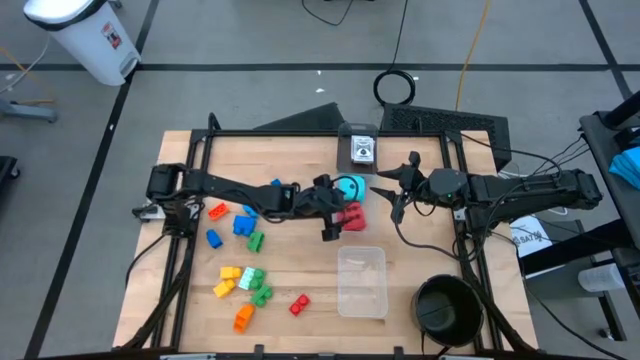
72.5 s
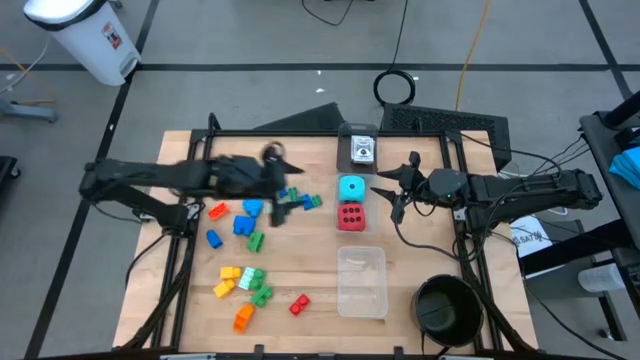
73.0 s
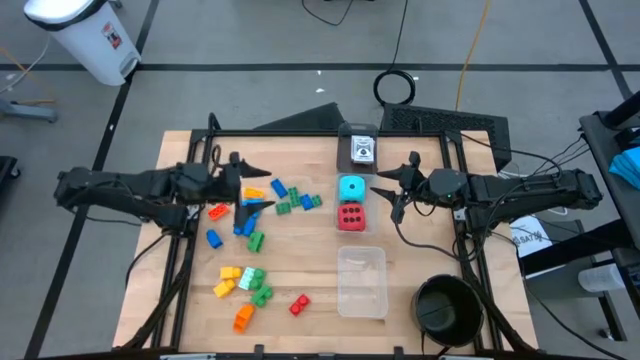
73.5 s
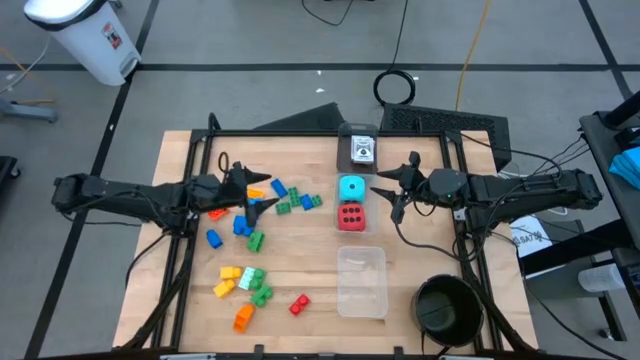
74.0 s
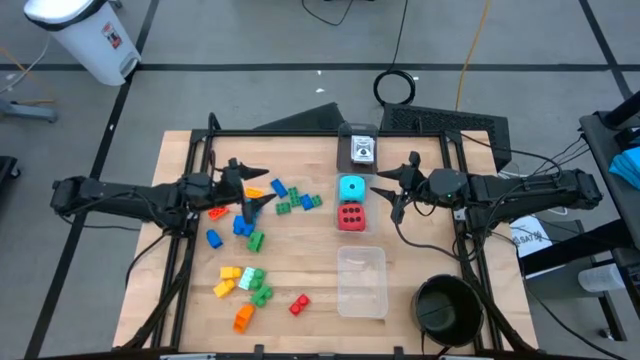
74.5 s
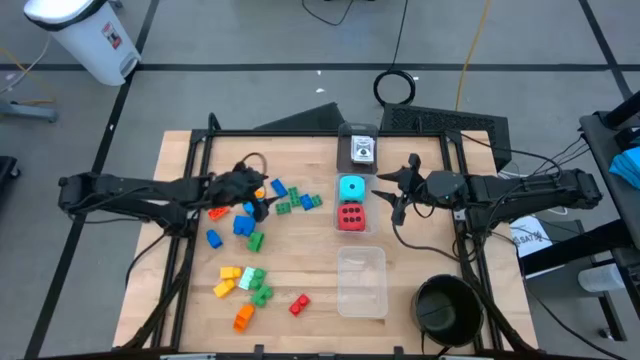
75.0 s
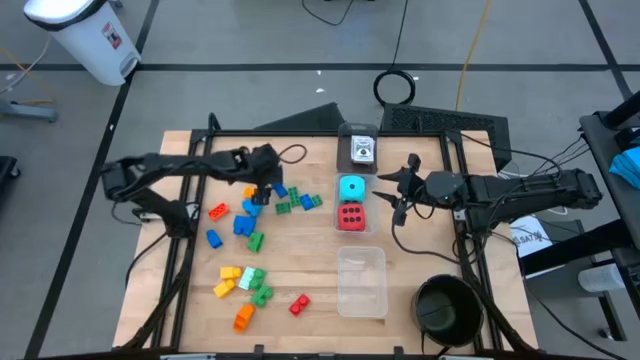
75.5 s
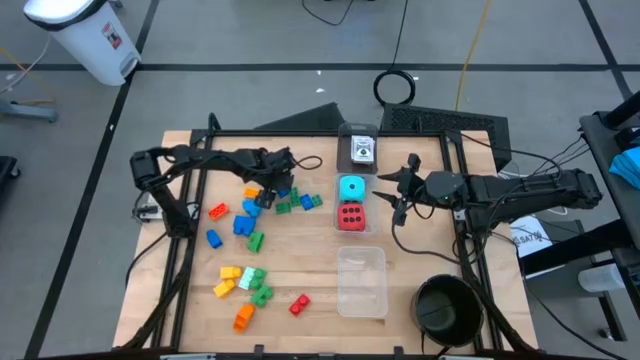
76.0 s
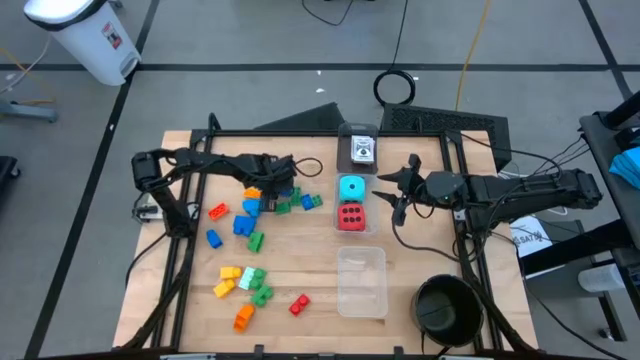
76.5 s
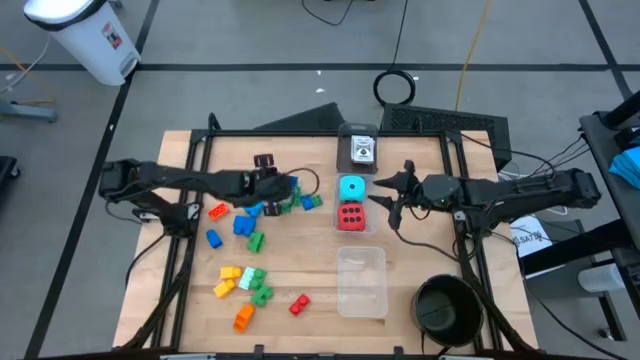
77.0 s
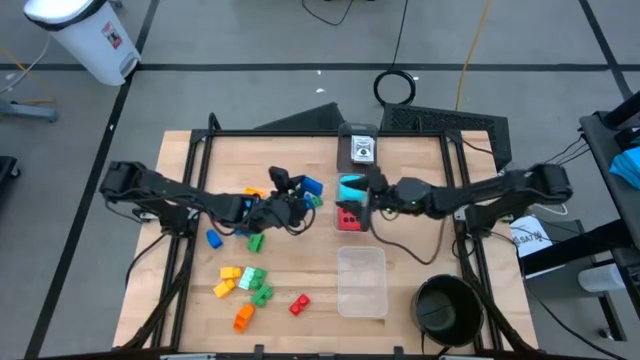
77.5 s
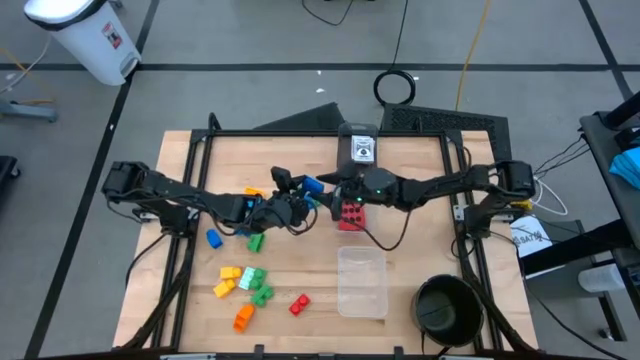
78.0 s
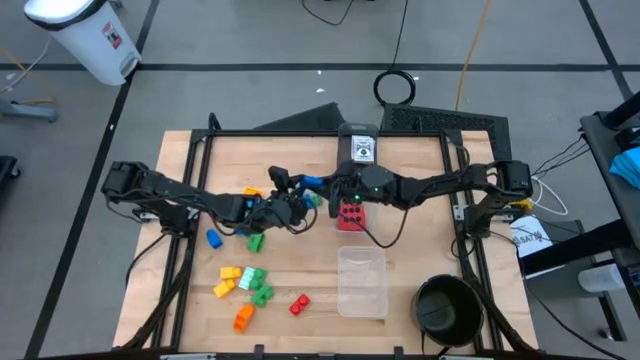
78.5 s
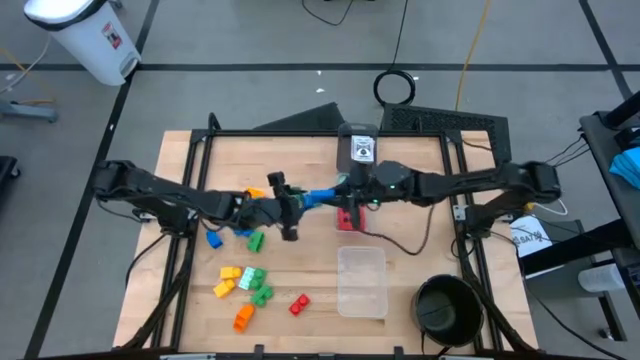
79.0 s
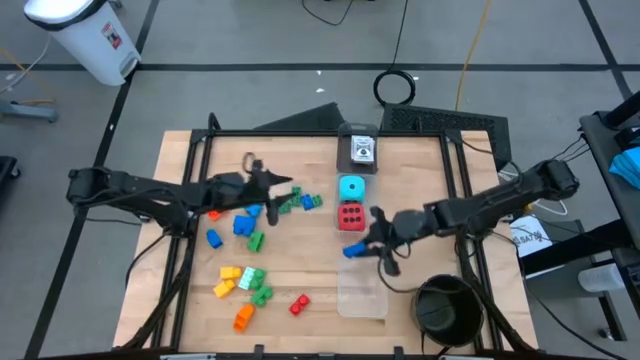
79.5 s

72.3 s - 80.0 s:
Task: Pick & Place Toys
Put the blue 8 stud game piece into the bottom transparent bin

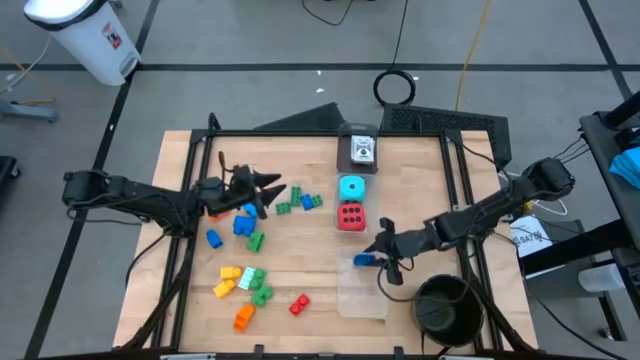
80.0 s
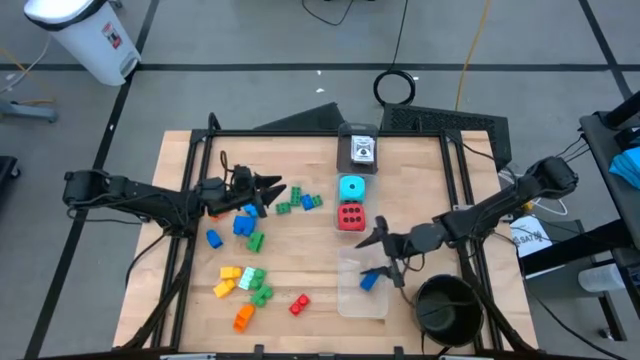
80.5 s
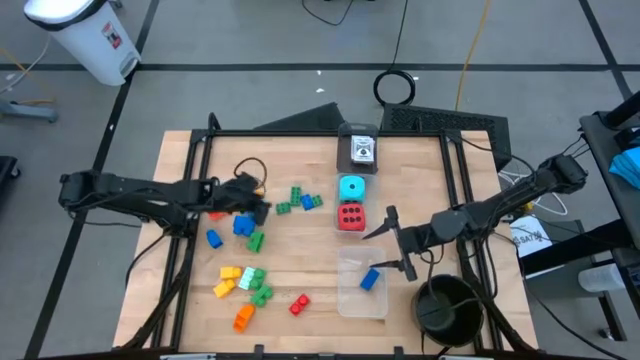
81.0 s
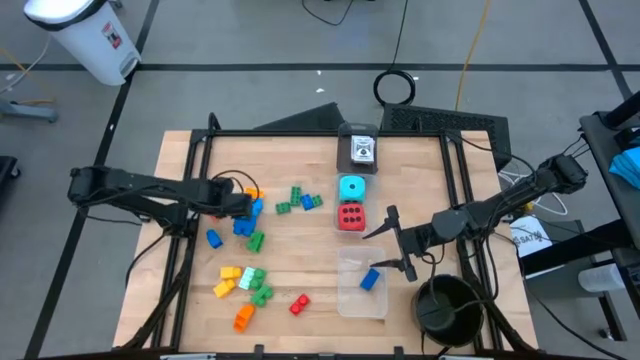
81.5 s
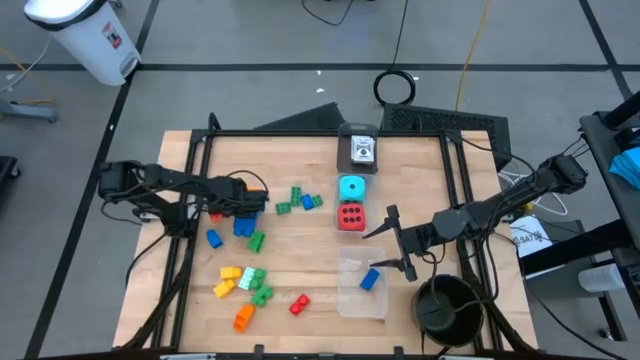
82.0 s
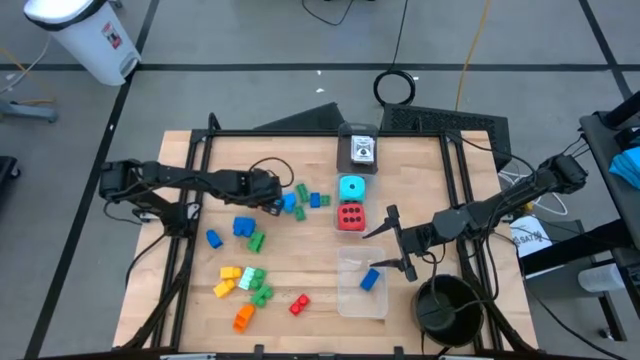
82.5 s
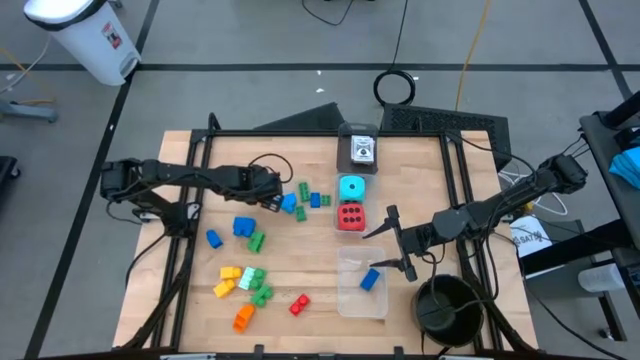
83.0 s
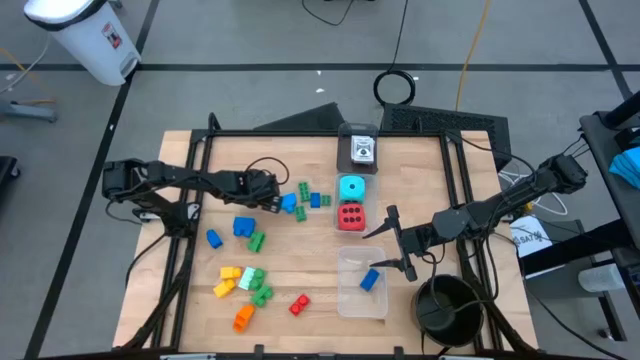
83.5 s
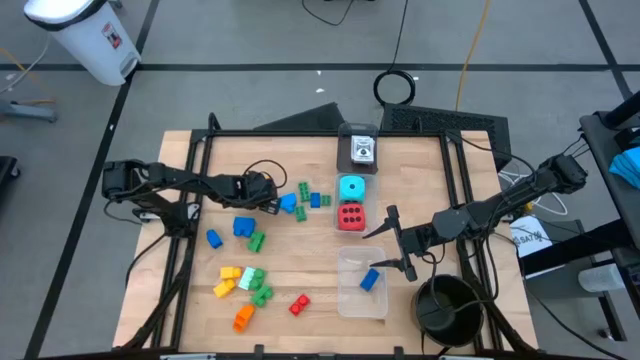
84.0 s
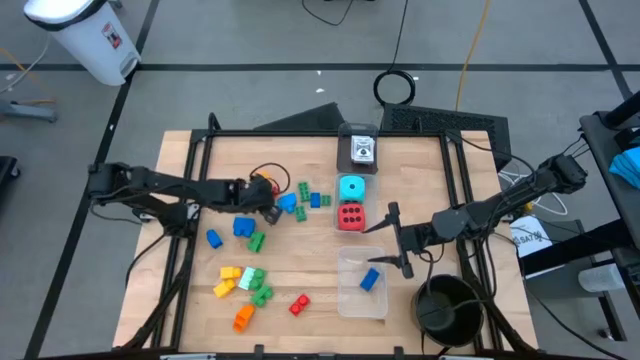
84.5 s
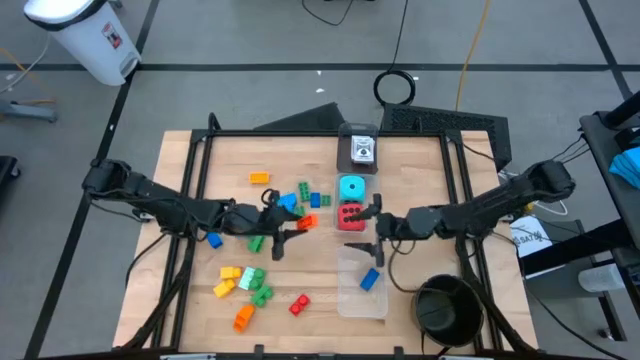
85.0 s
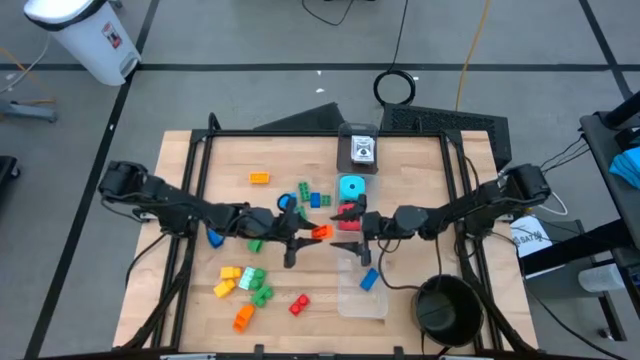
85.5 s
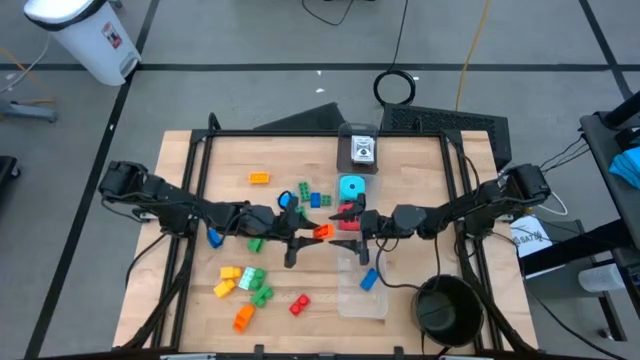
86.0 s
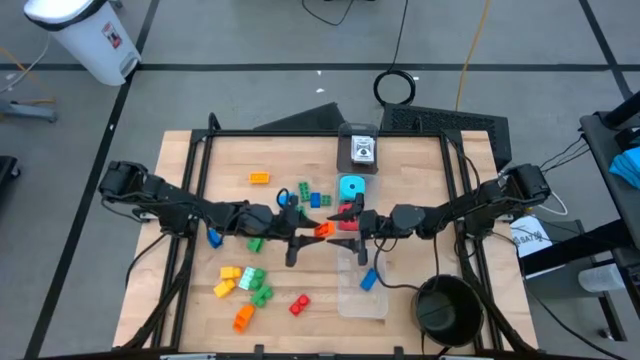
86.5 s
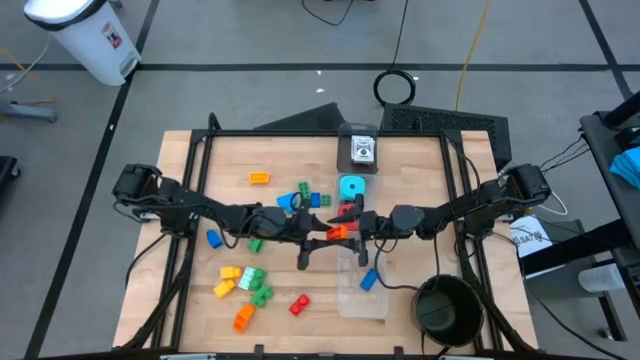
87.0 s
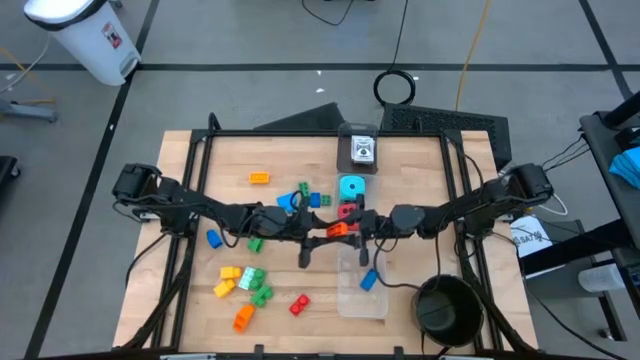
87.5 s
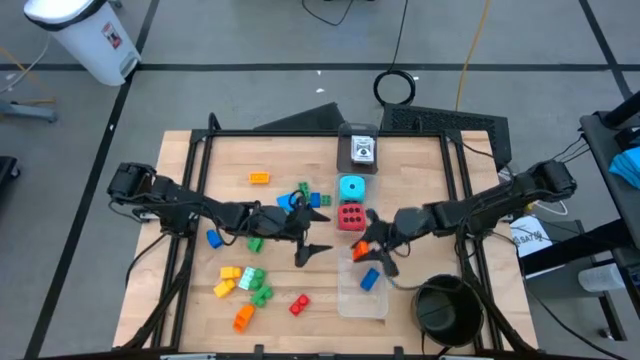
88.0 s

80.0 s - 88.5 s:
Put the orange 3 stud game piece into the bottom transparent bin

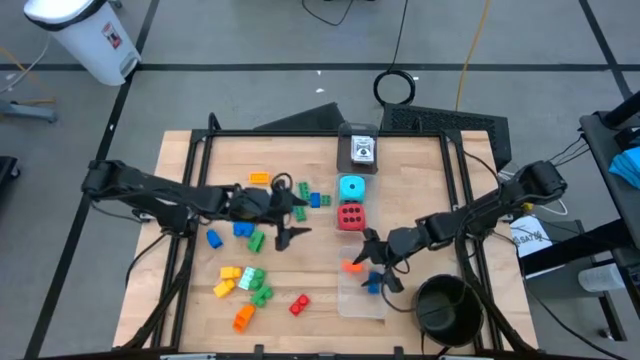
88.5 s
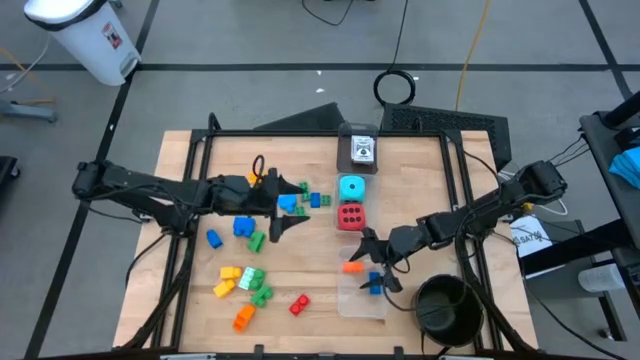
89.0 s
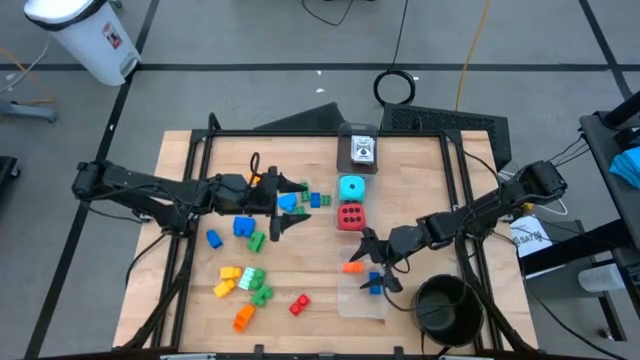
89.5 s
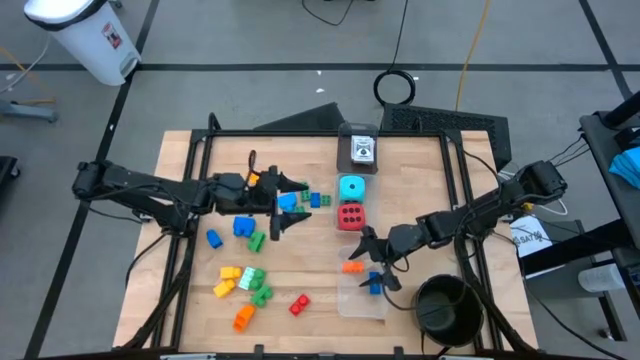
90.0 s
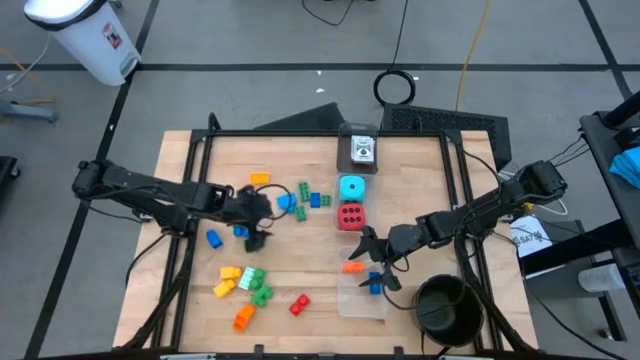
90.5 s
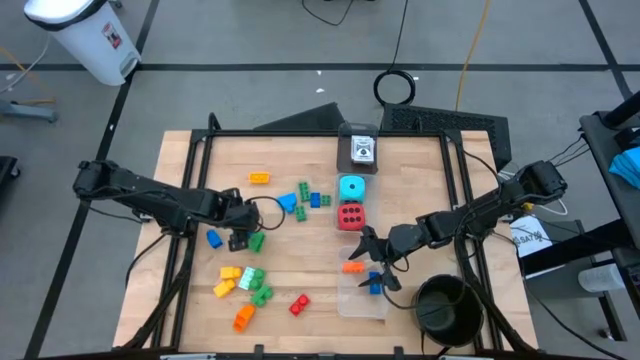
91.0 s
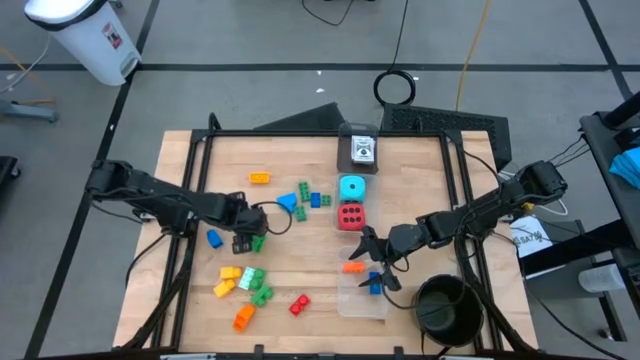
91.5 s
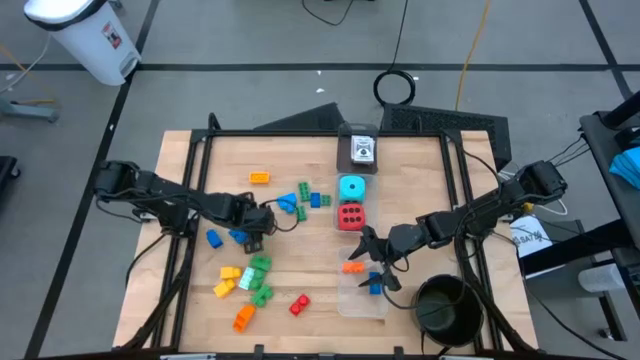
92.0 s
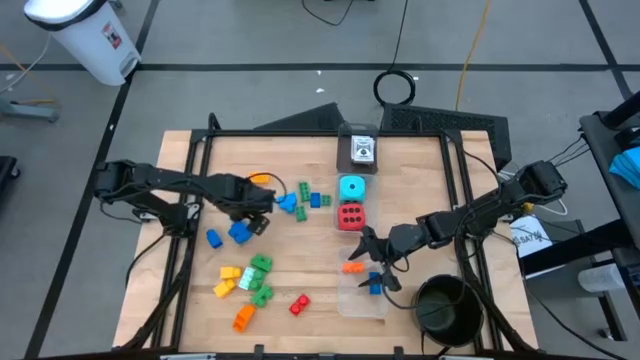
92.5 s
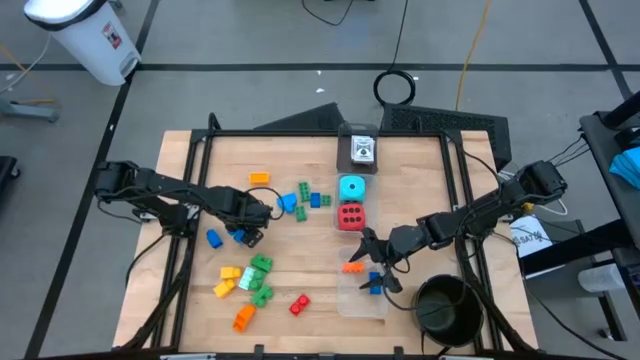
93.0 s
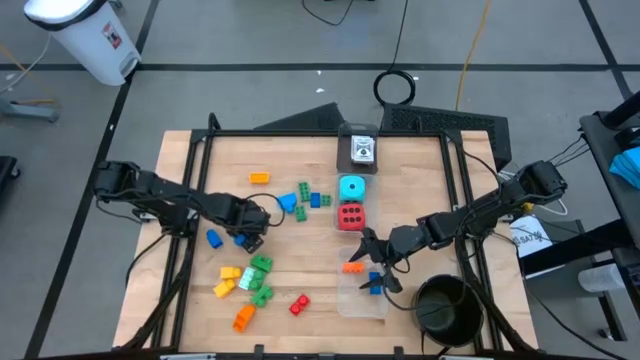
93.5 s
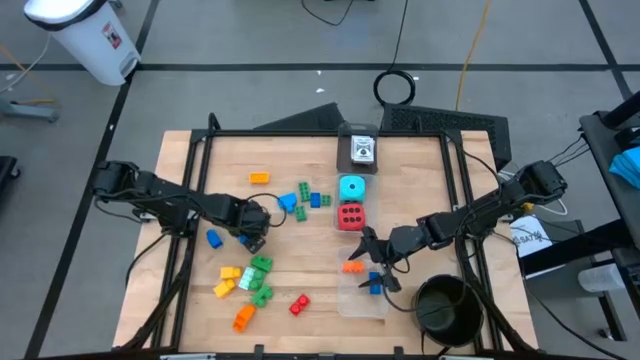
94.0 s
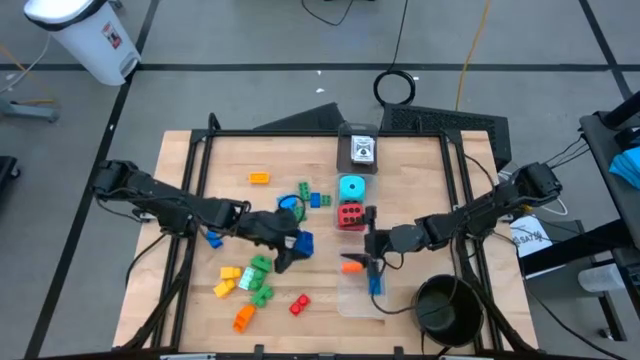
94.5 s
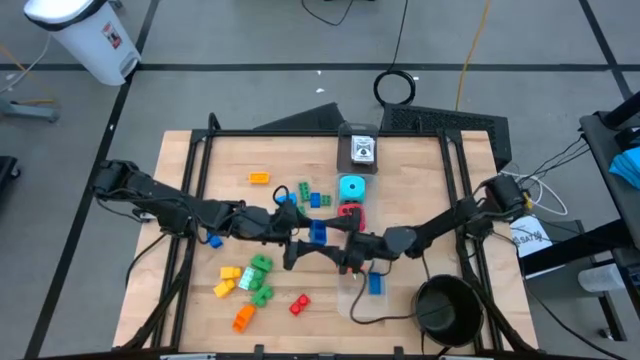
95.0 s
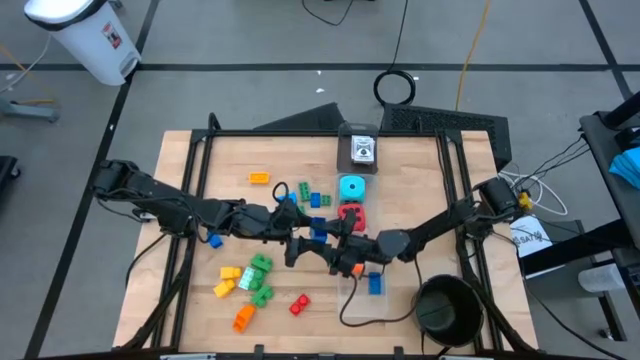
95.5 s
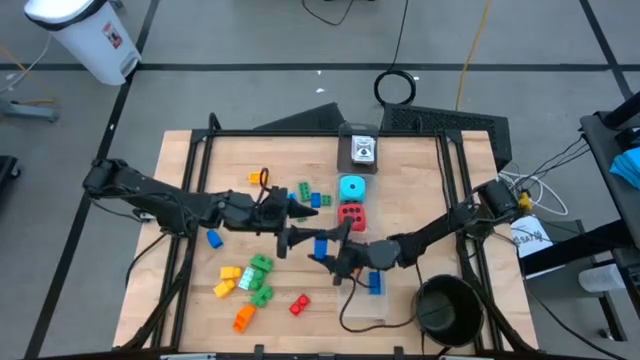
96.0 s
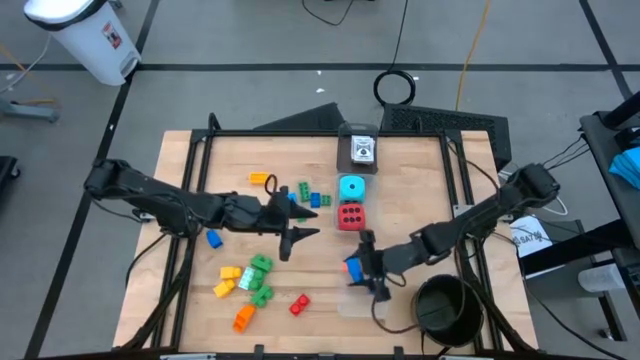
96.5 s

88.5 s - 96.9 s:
Put the blue 2 stud game piece into the bottom transparent bin
